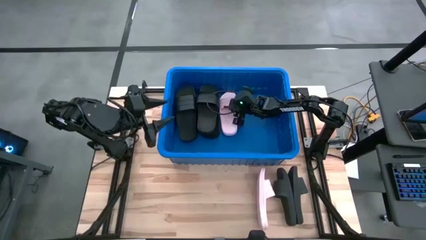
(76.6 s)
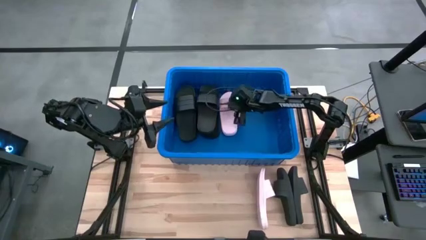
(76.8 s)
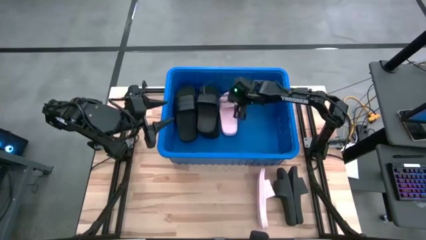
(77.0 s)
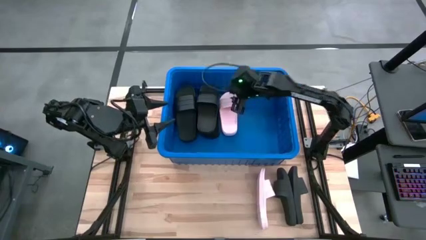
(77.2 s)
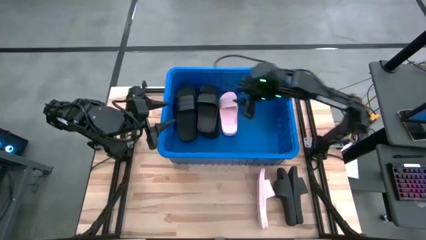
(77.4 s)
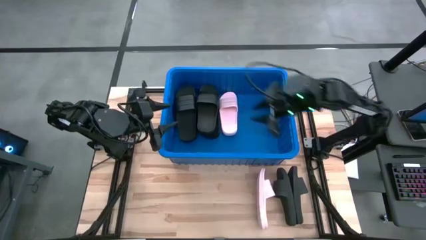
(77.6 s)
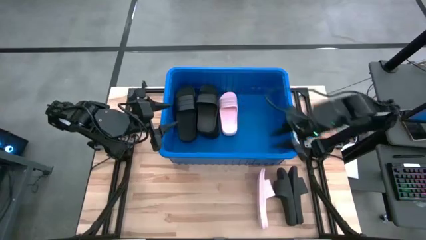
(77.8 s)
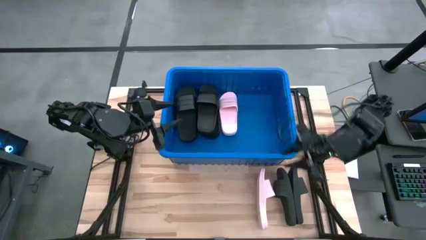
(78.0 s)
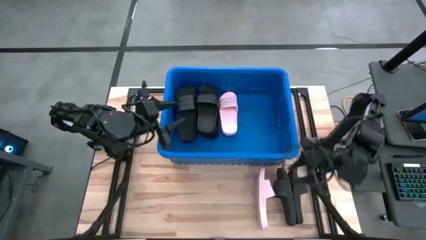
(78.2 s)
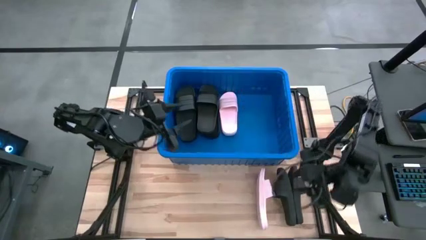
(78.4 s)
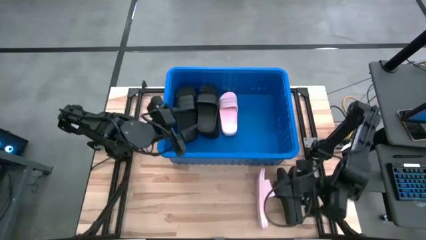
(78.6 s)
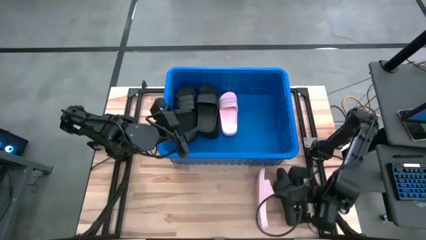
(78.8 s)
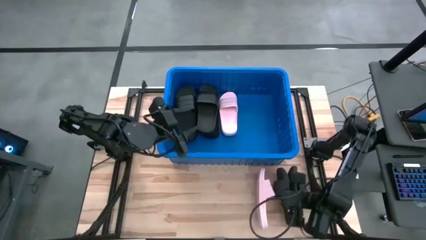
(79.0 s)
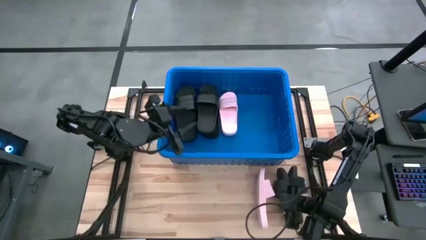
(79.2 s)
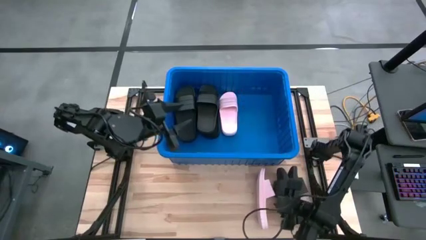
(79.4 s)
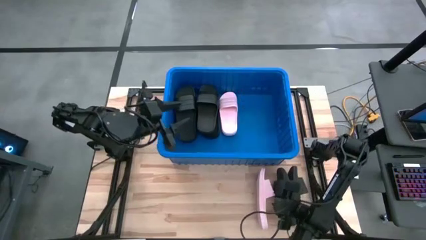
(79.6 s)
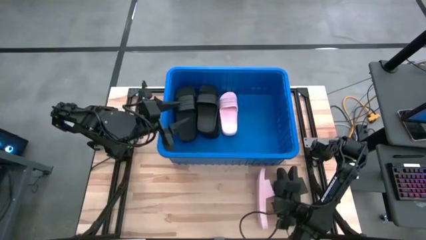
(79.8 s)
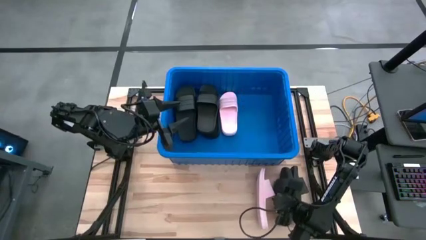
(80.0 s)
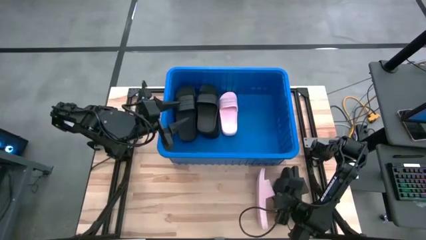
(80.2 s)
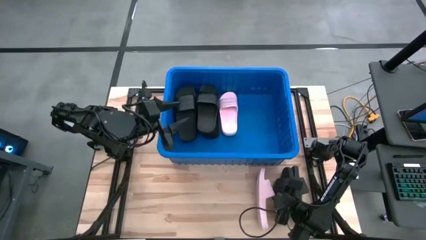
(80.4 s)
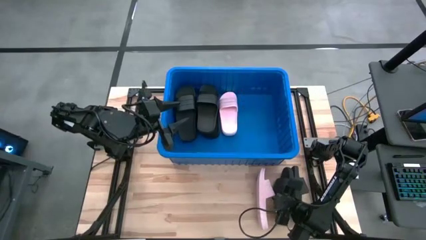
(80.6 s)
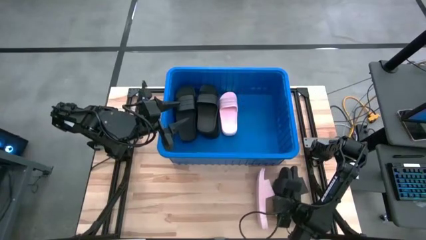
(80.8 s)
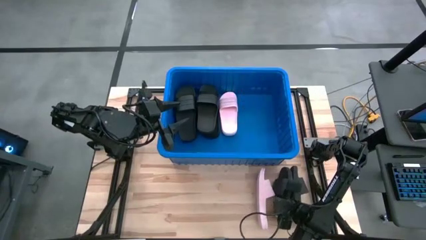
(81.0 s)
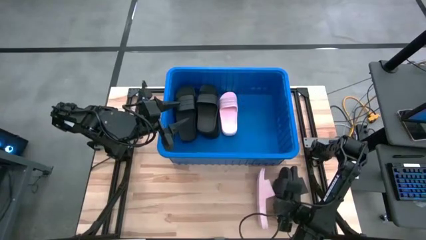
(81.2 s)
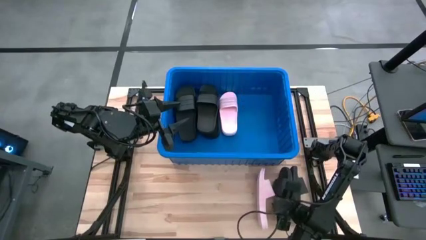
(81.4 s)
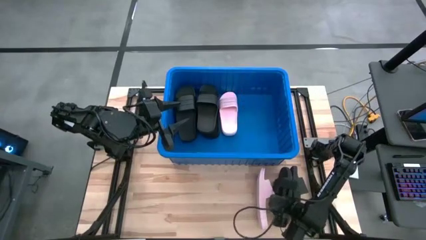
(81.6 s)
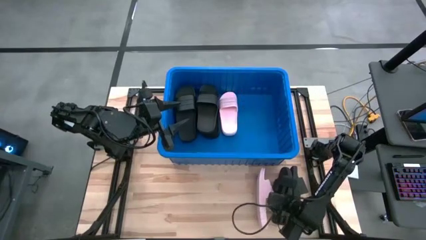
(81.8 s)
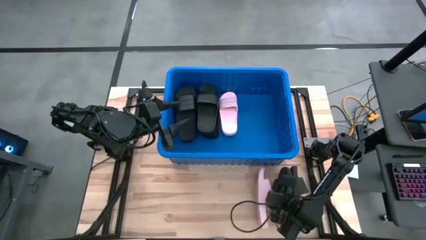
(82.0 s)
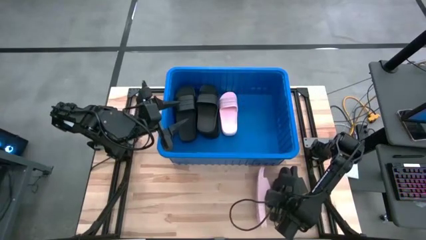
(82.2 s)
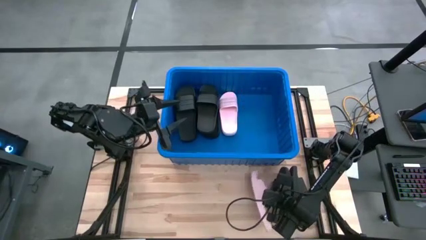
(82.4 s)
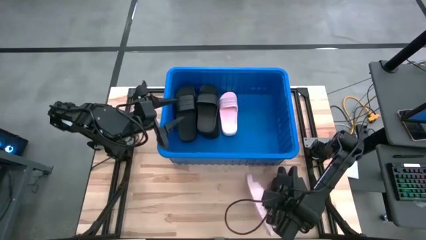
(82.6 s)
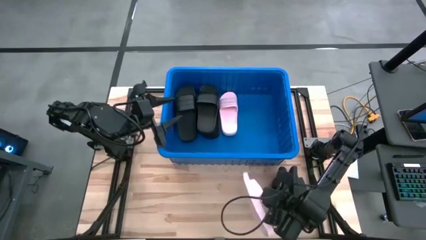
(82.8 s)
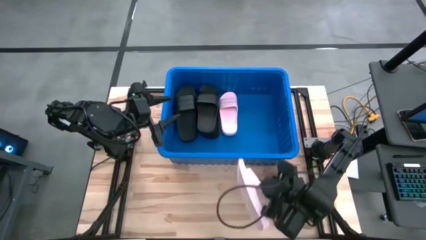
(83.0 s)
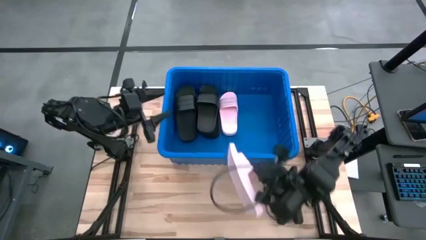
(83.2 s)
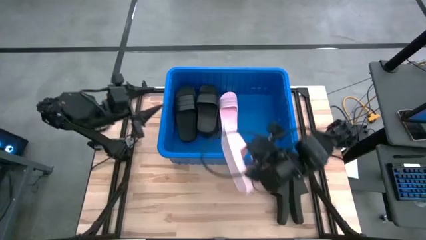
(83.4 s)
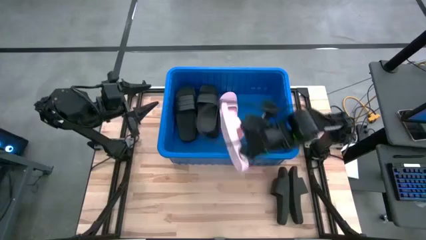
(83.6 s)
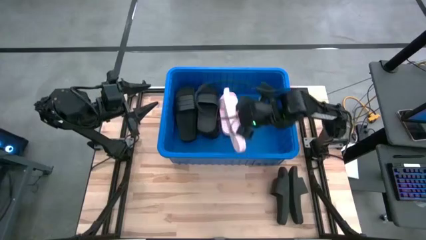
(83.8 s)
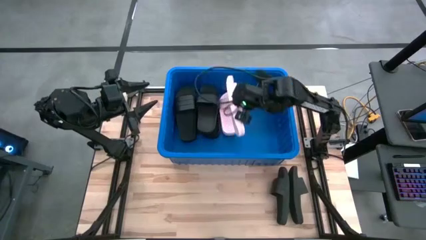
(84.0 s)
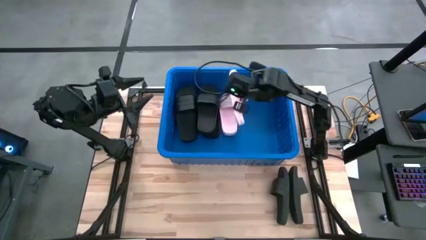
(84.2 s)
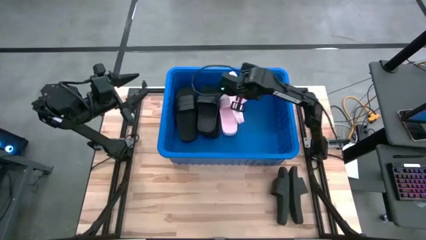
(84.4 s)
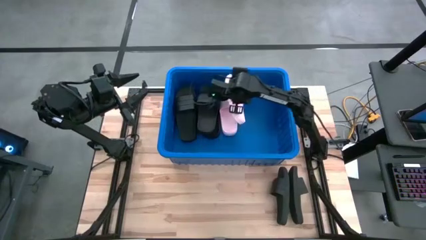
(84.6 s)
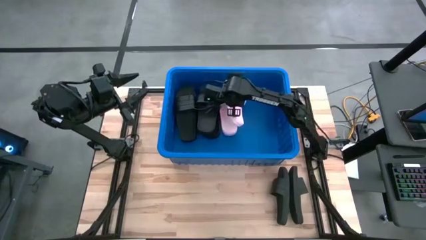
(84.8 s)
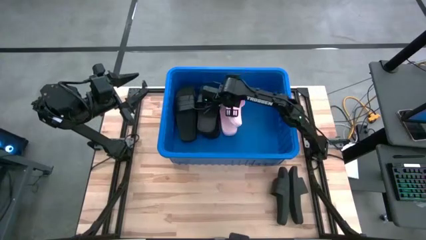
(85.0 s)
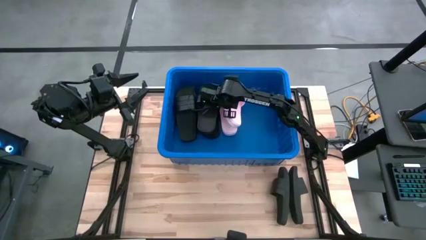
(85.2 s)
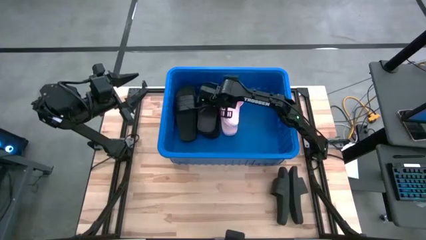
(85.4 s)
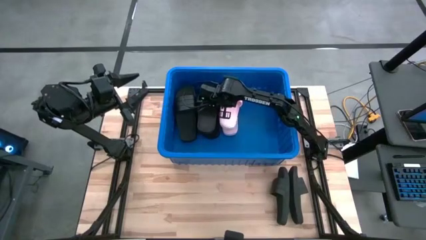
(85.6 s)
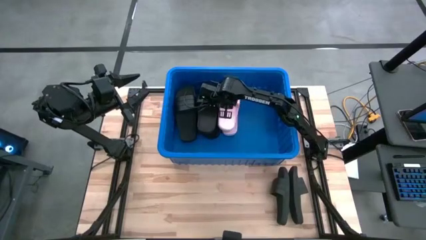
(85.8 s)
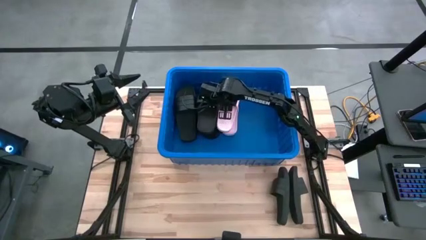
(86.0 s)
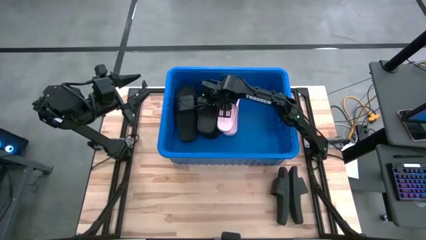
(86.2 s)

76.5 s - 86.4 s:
Task: Pick and place slides into bin
Put the pink slide into the blue bin

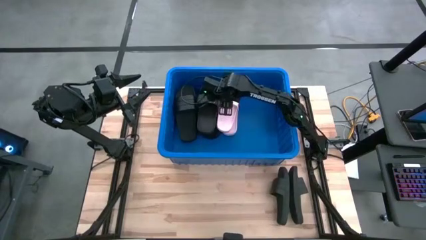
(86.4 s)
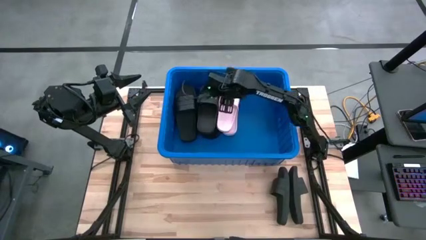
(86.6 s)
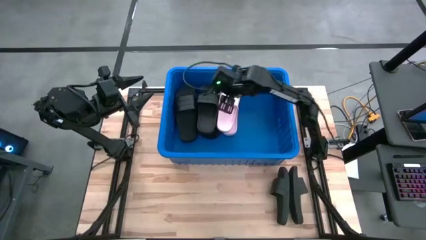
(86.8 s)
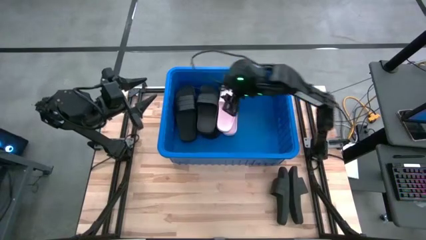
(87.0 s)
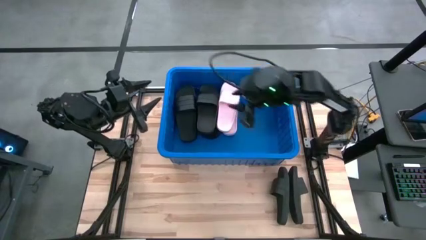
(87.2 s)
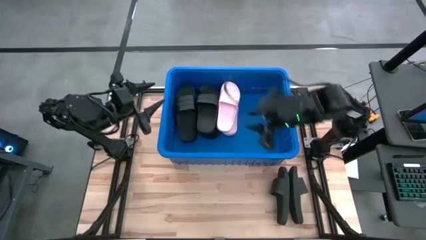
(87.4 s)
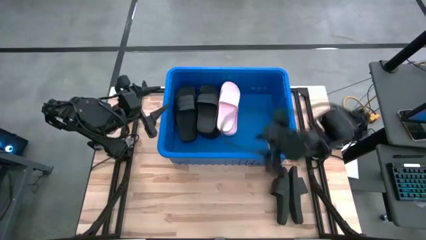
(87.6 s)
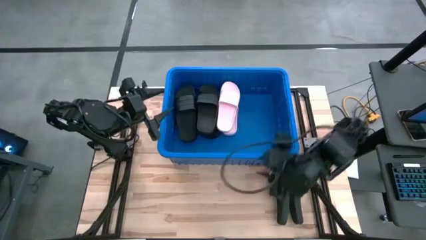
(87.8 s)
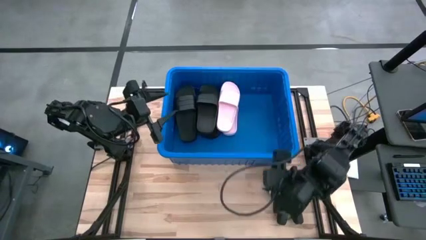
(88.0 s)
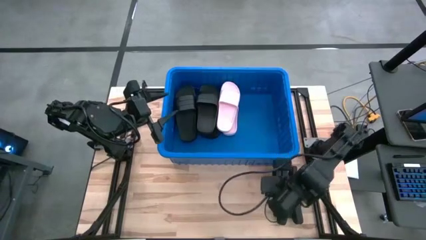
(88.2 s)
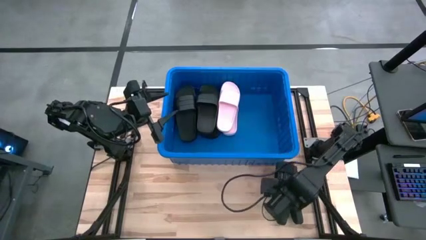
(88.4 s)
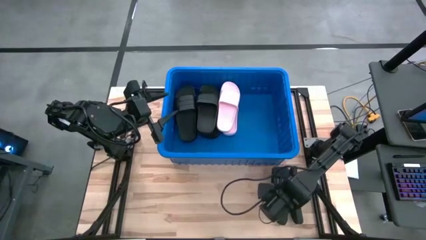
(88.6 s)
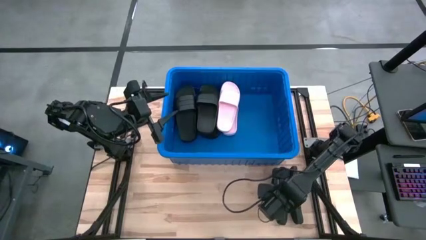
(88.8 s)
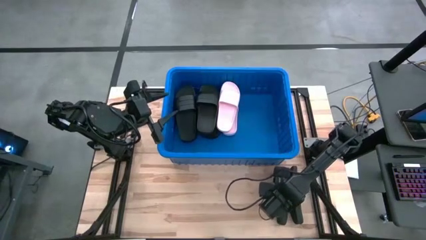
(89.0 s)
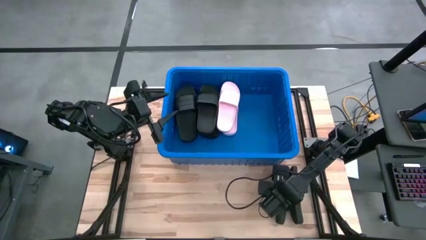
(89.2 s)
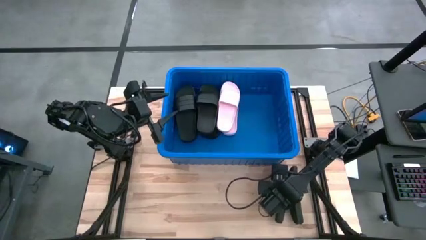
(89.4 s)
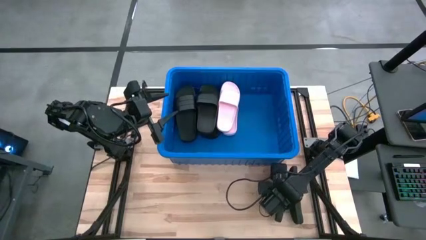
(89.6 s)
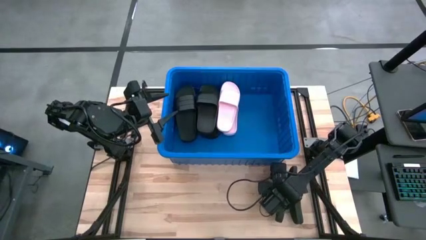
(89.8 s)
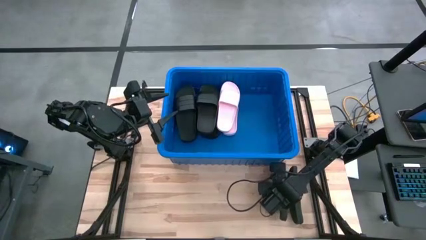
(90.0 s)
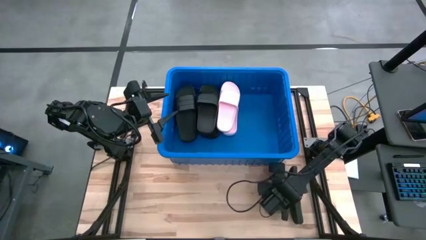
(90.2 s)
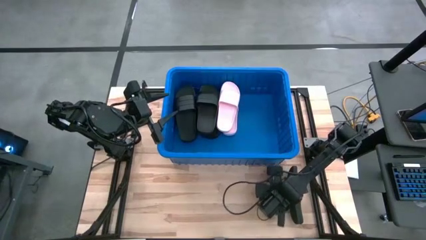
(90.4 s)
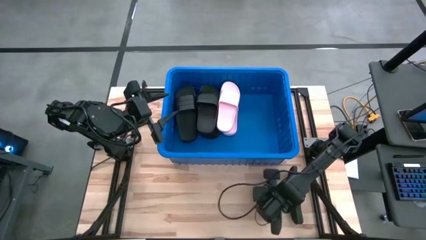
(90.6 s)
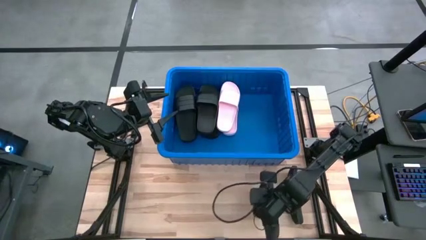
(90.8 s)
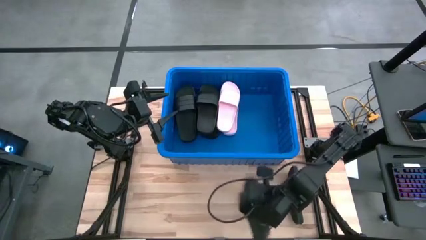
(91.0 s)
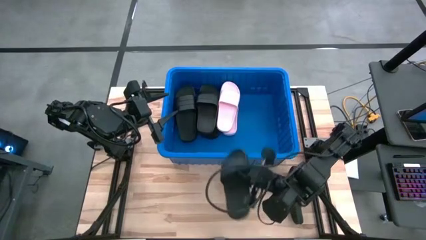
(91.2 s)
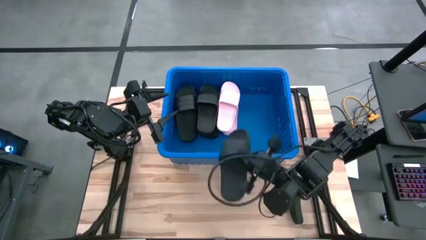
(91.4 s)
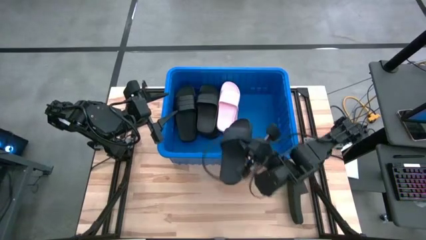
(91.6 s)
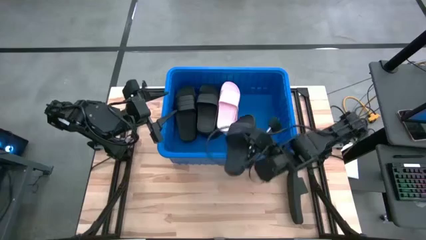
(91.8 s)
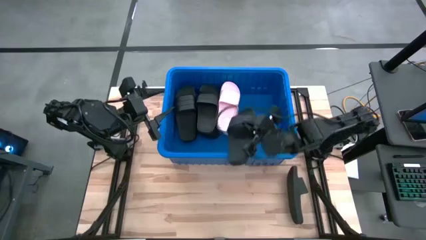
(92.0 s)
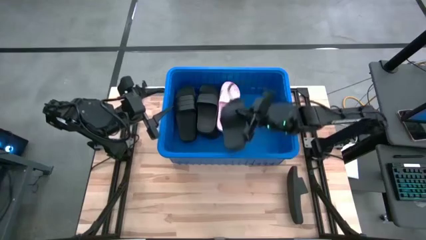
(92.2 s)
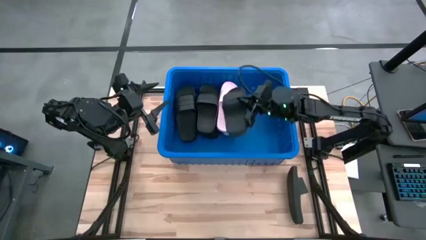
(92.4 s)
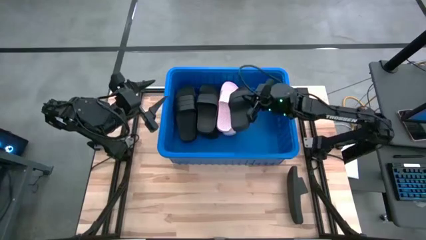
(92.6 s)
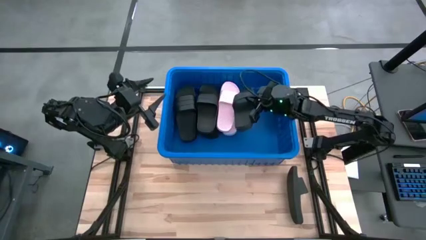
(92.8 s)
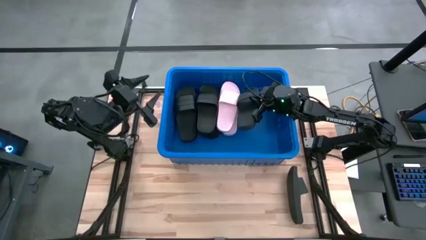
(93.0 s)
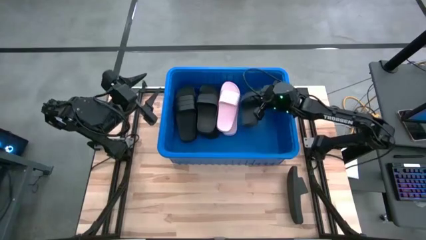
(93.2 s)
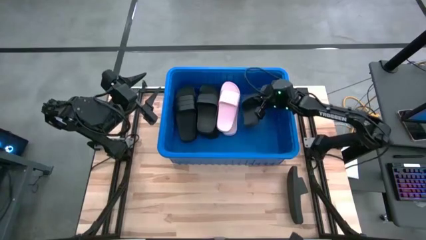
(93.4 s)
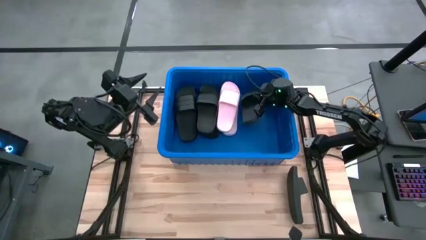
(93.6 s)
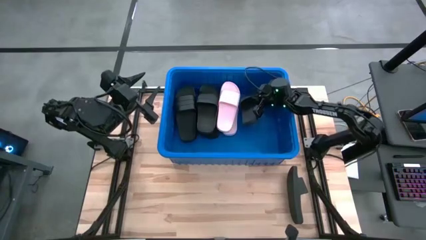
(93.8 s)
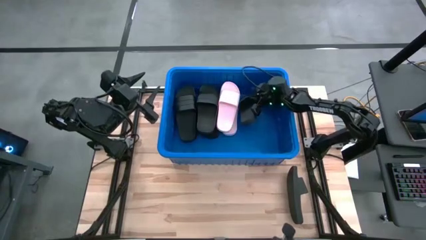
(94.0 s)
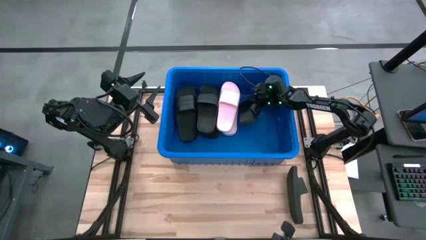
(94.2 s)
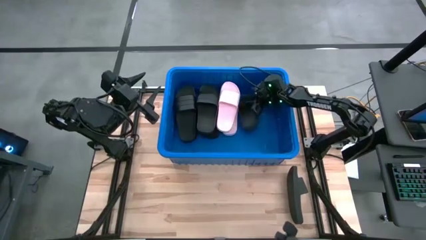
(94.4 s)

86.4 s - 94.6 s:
Put the black slide into the blue bin
